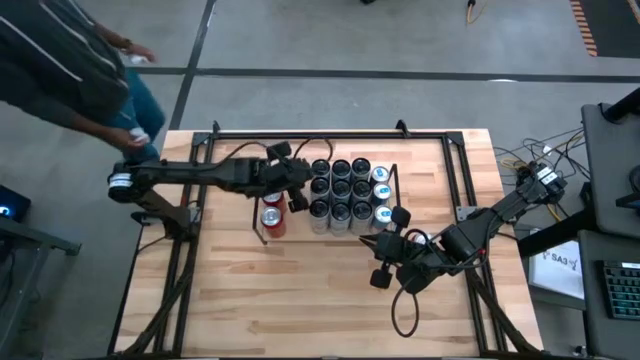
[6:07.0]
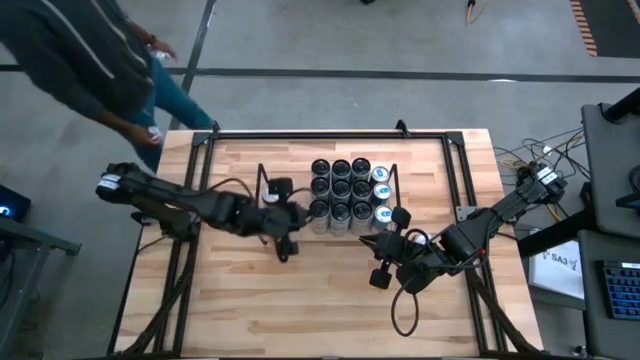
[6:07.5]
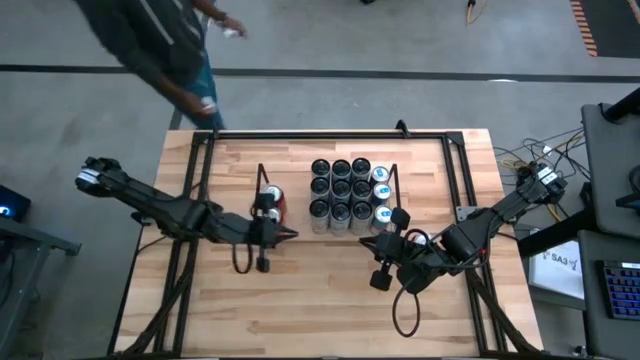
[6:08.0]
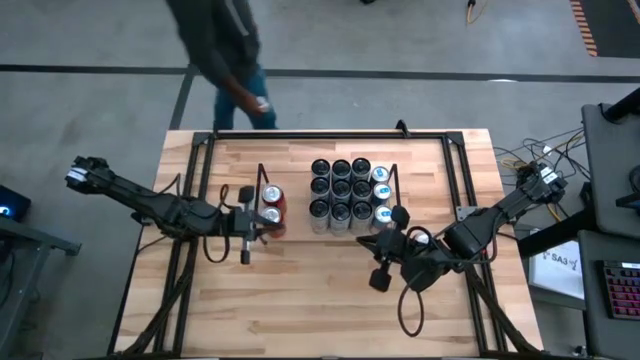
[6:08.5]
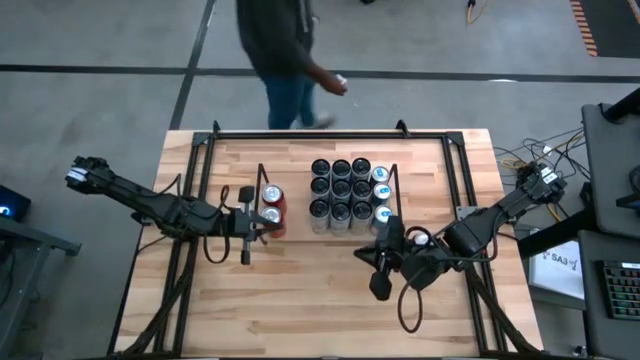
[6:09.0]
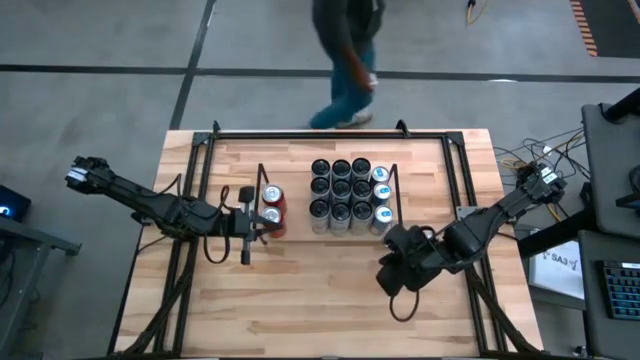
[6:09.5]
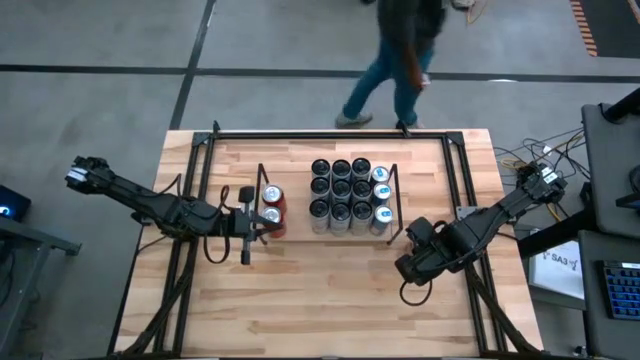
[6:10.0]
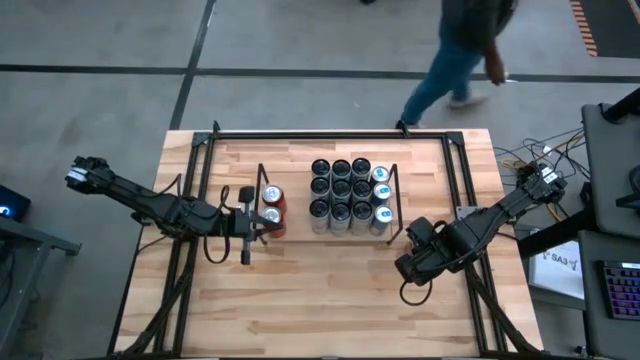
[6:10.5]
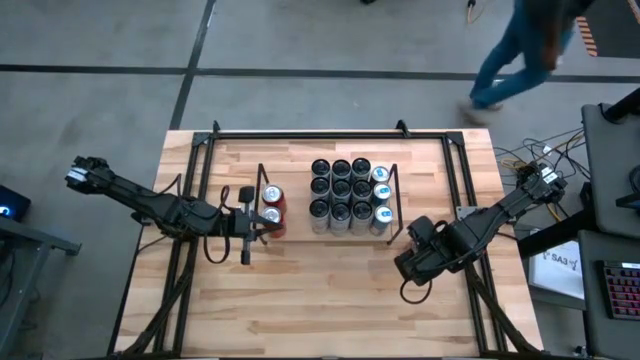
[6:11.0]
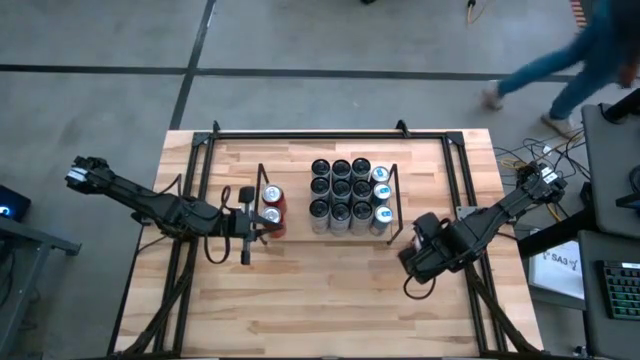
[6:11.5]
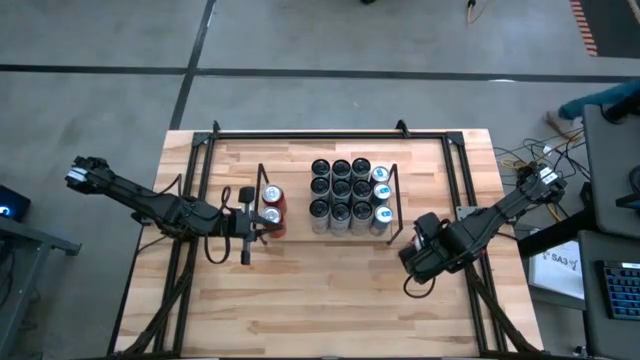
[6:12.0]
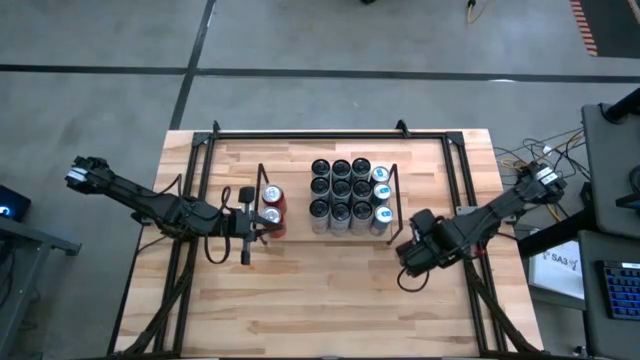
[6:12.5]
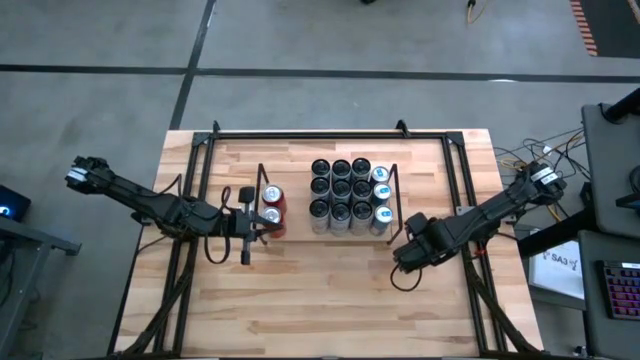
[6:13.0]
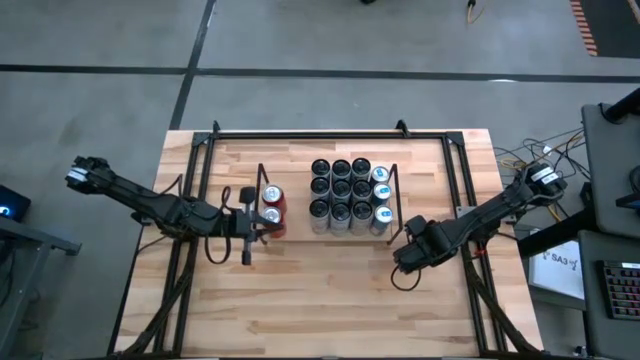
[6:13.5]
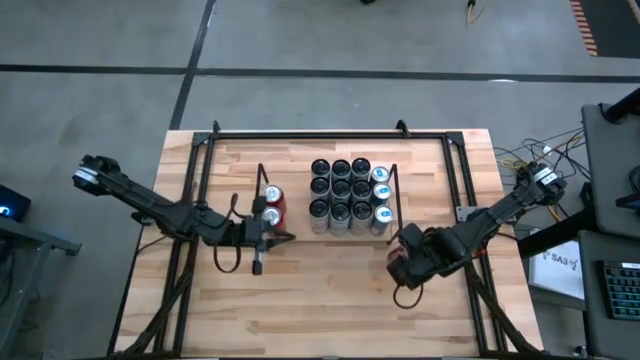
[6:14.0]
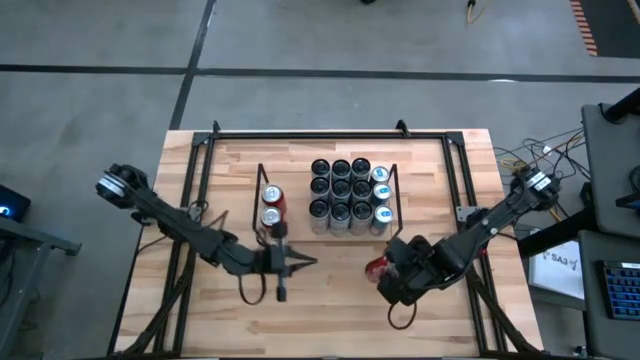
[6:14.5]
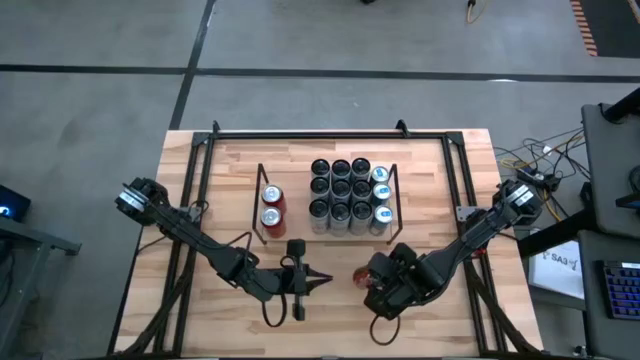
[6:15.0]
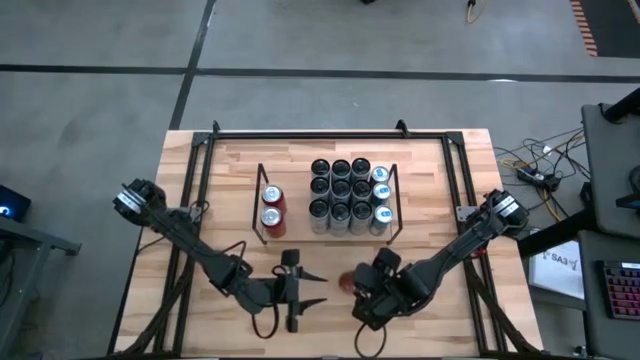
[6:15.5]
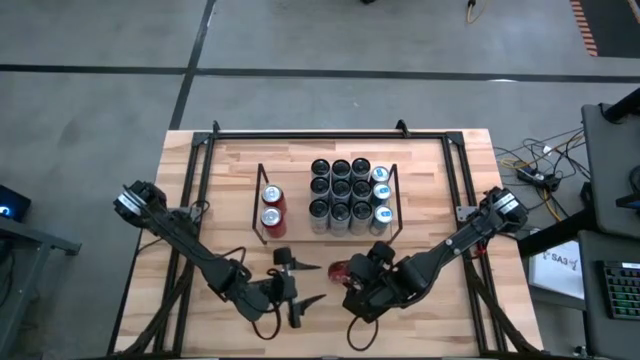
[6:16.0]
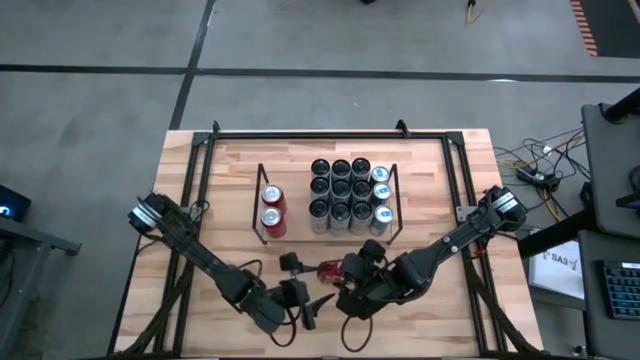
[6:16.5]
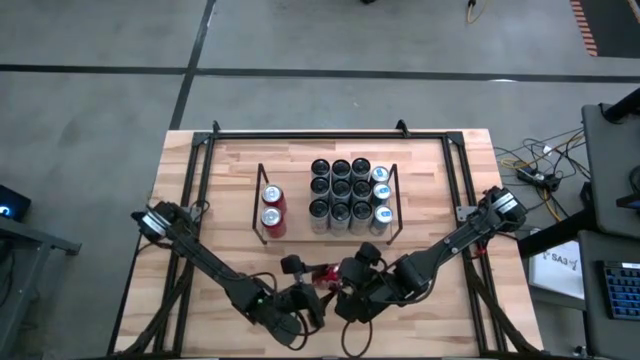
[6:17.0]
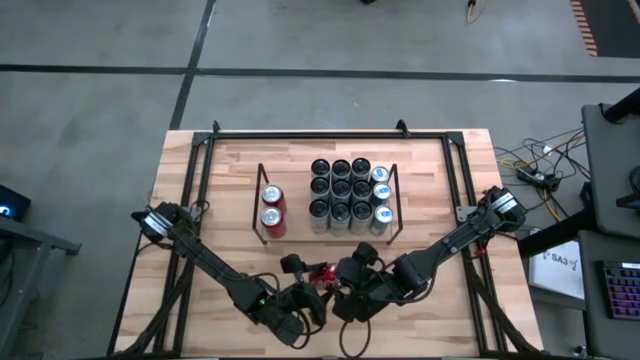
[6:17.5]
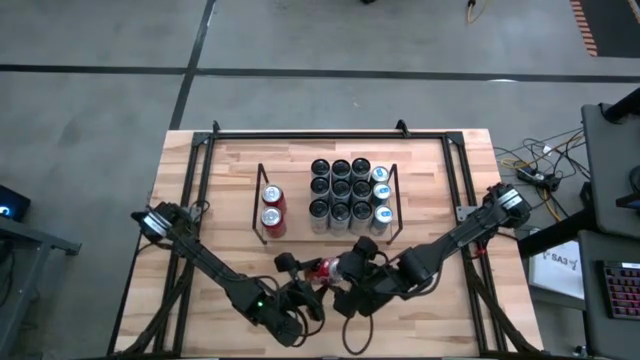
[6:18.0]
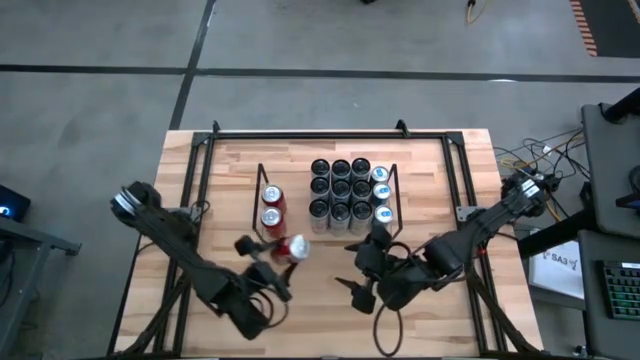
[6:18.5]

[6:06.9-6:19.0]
Task: Place canned beverage on shelf
Put the red and white soda can on the shelf

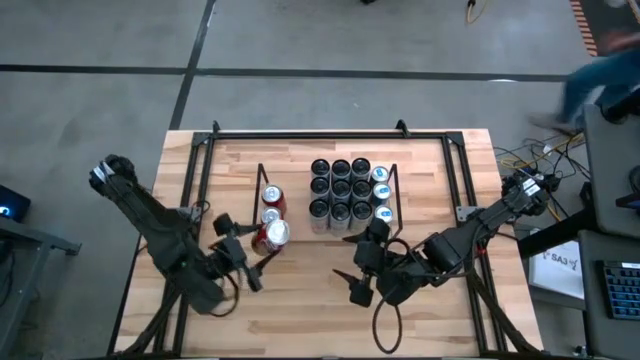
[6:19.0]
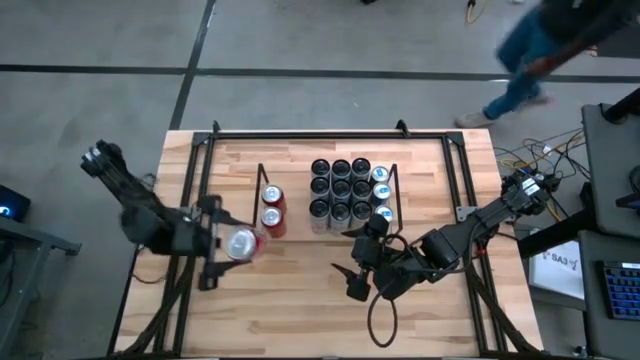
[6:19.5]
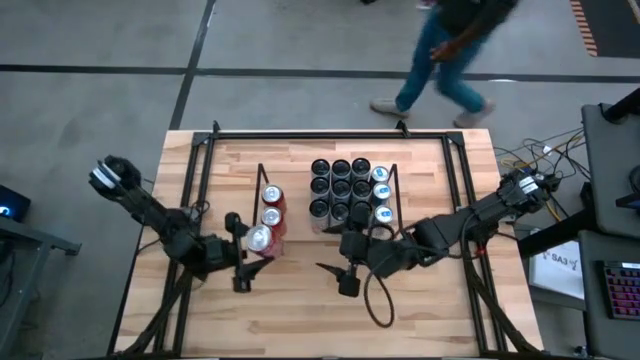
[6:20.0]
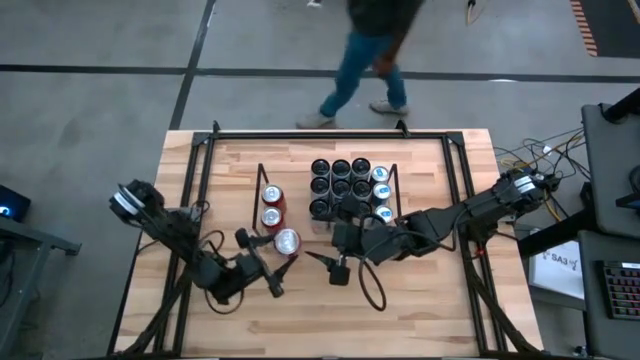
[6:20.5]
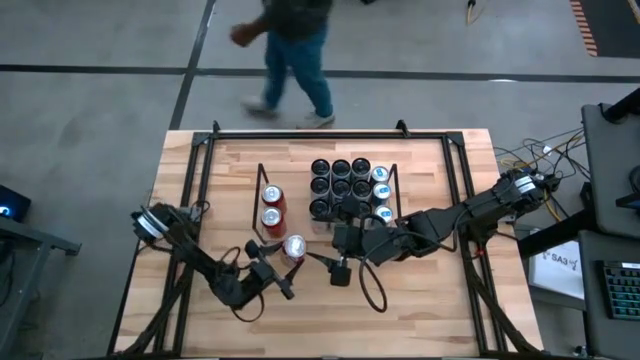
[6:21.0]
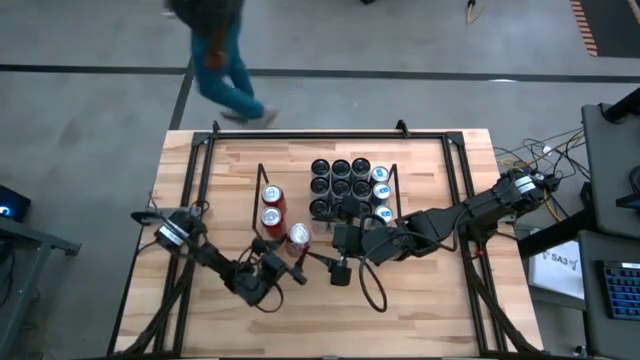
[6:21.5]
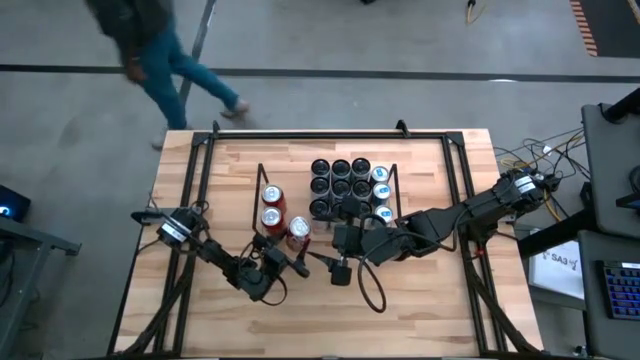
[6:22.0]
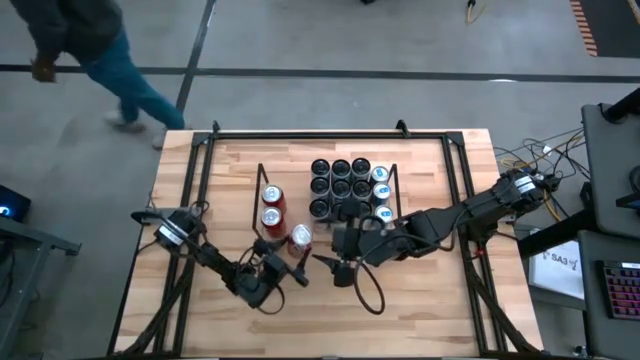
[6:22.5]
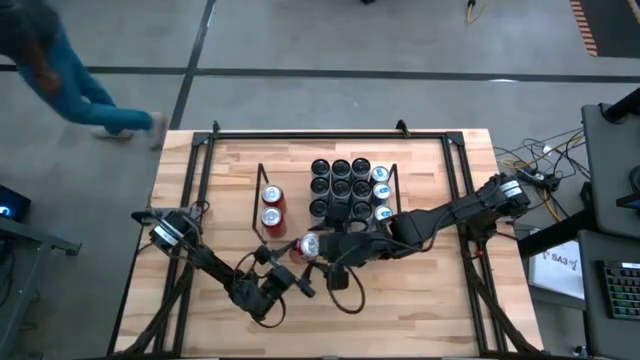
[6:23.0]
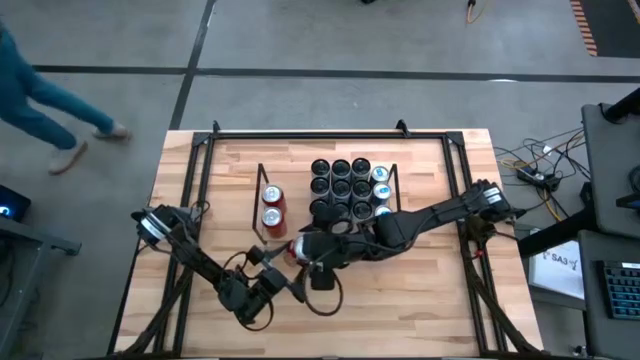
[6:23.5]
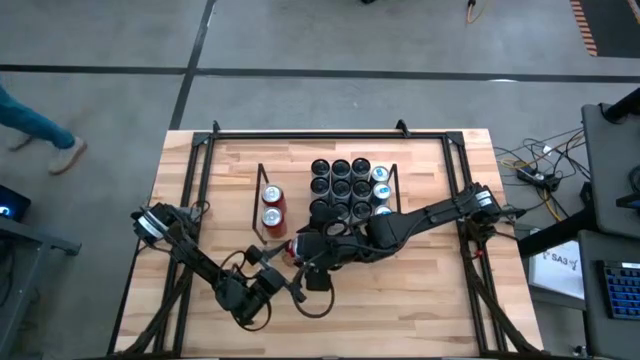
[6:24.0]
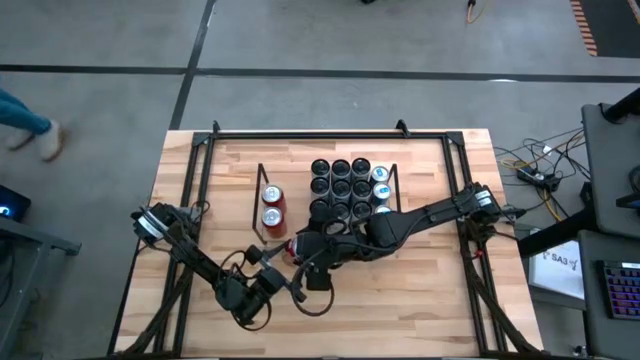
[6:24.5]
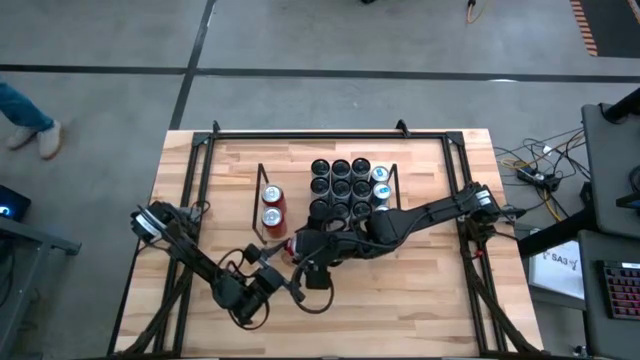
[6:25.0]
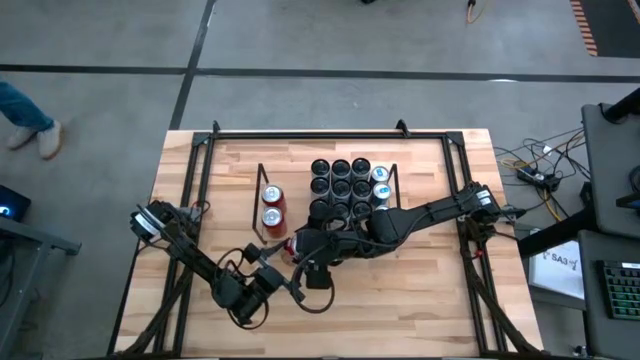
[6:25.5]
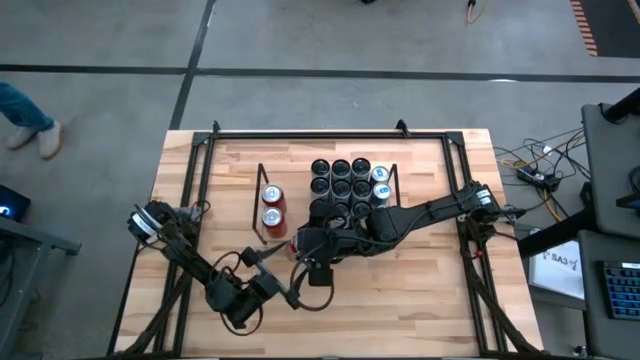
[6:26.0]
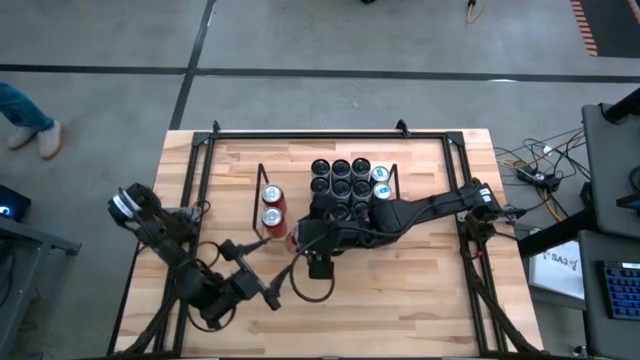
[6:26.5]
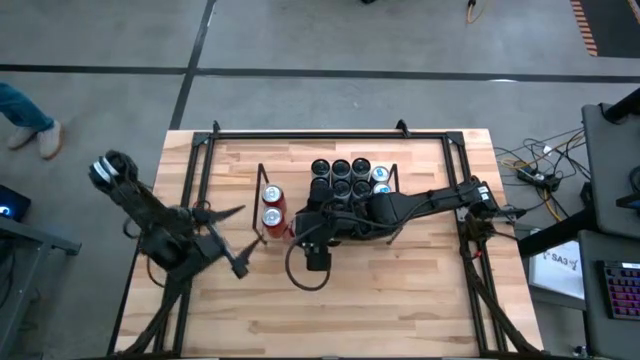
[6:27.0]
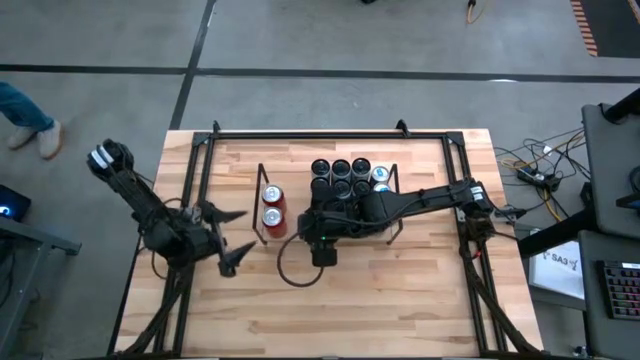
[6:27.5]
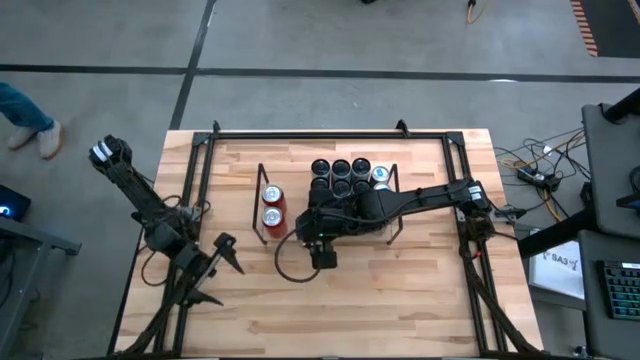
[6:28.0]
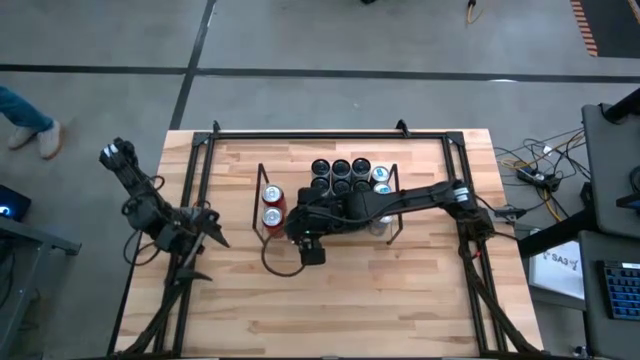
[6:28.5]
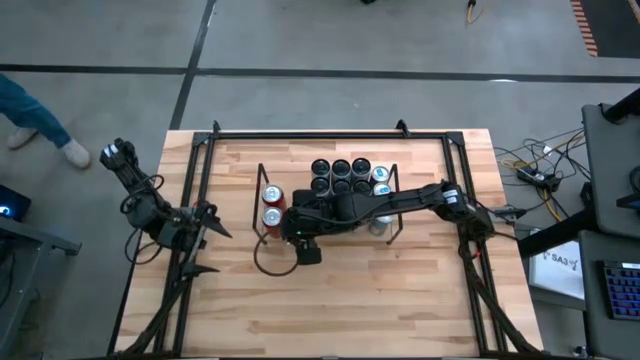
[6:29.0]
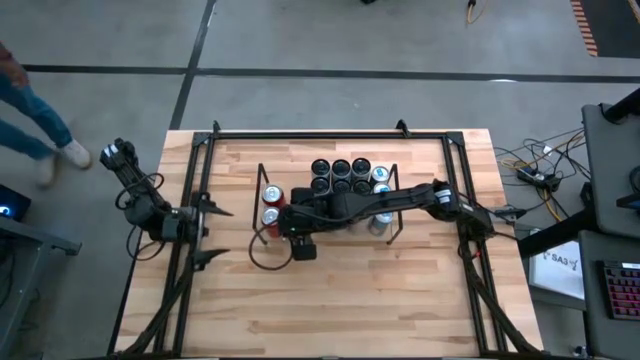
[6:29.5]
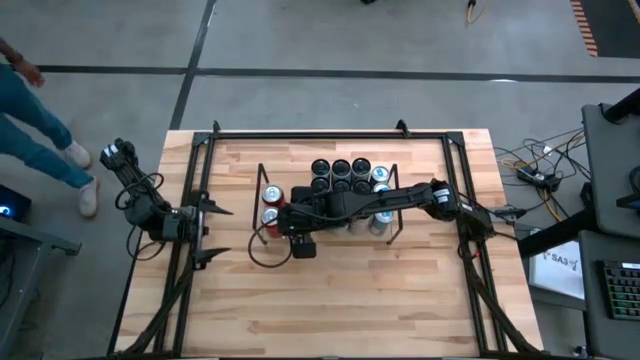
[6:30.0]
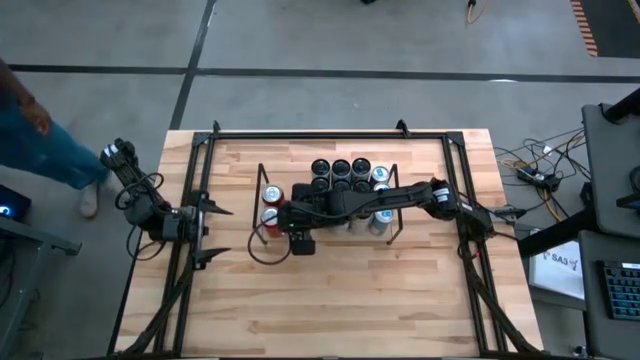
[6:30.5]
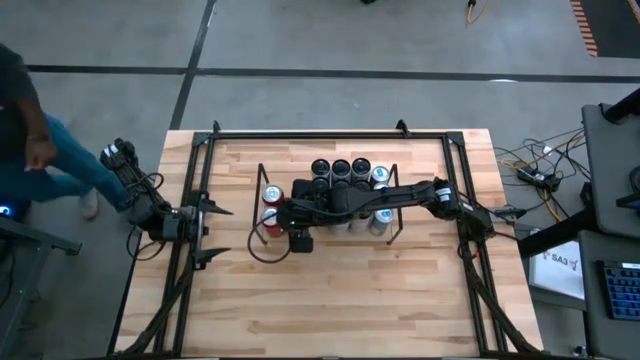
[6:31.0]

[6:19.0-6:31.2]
Put the red and white soda can on the shelf
